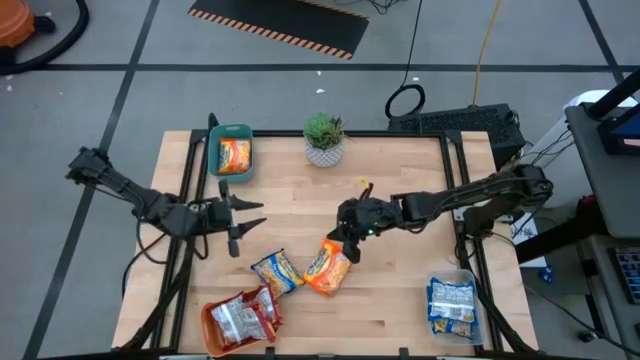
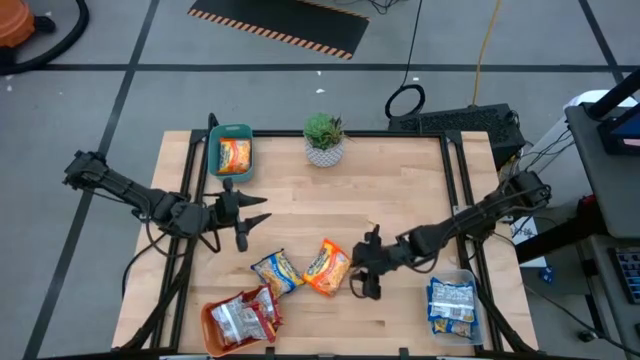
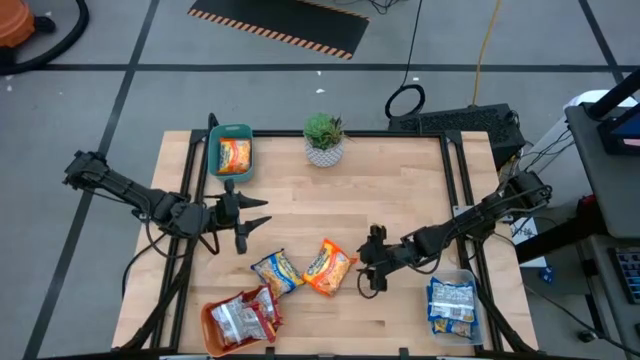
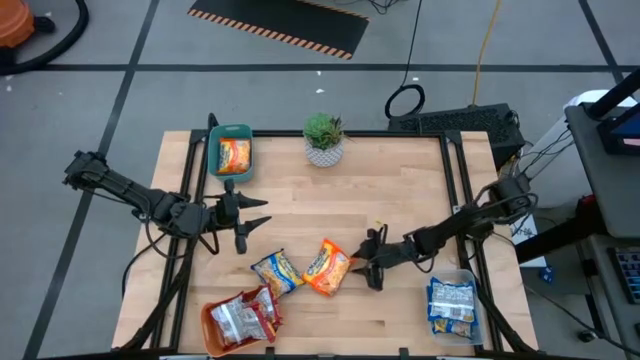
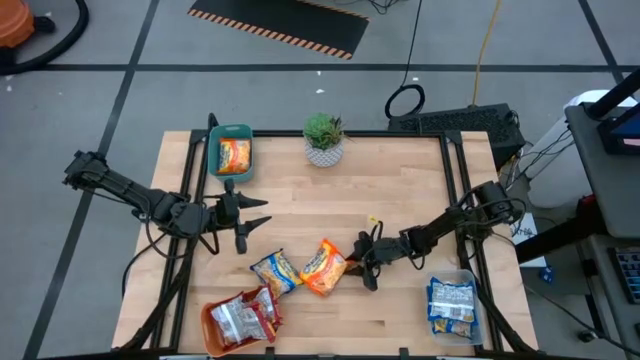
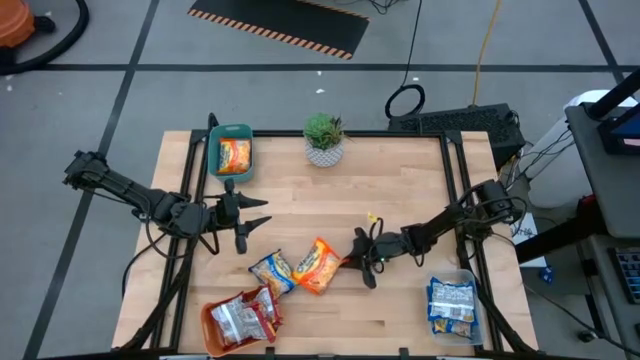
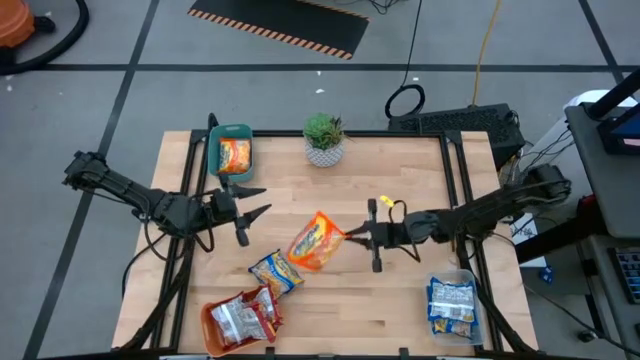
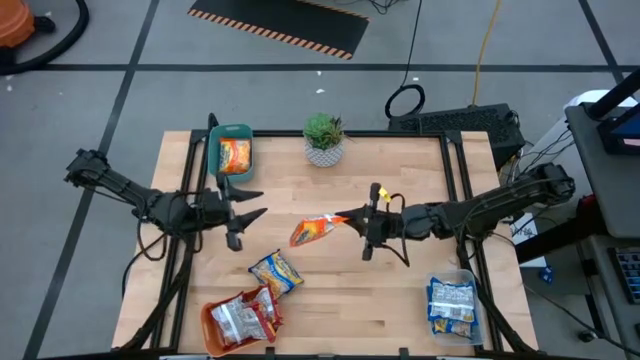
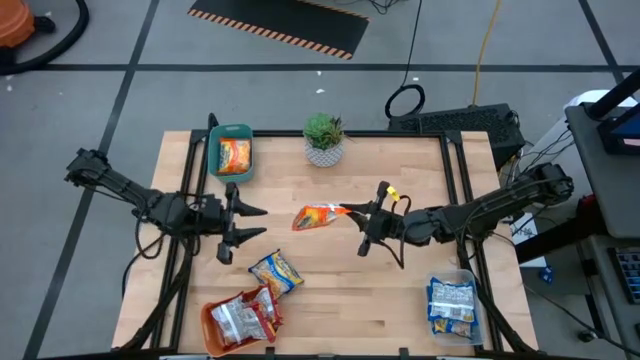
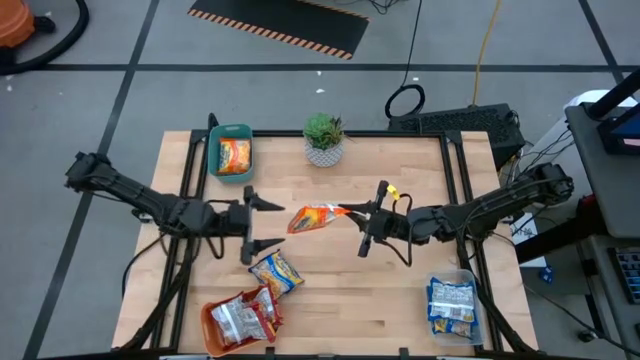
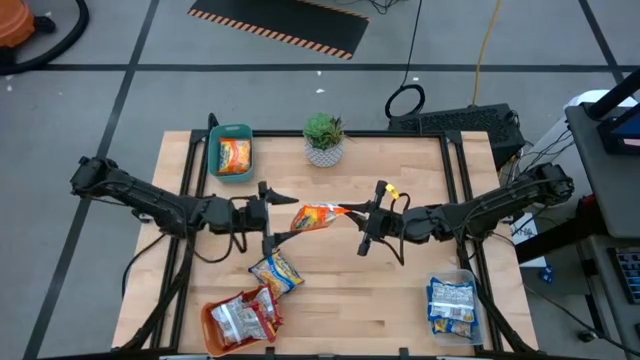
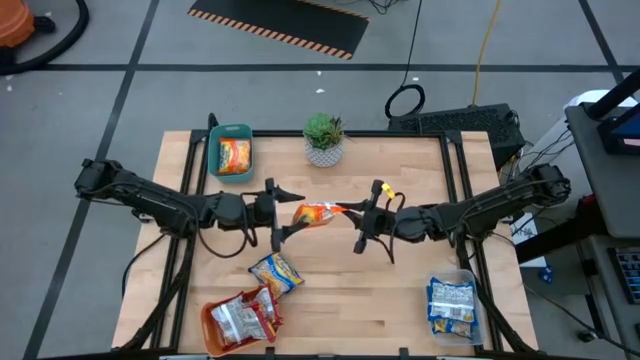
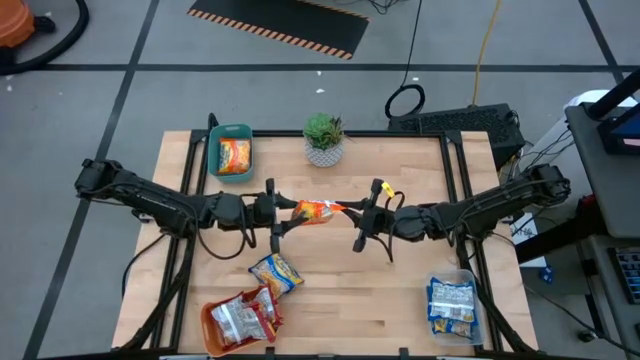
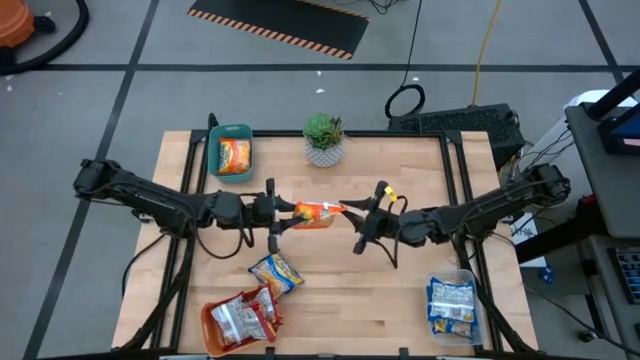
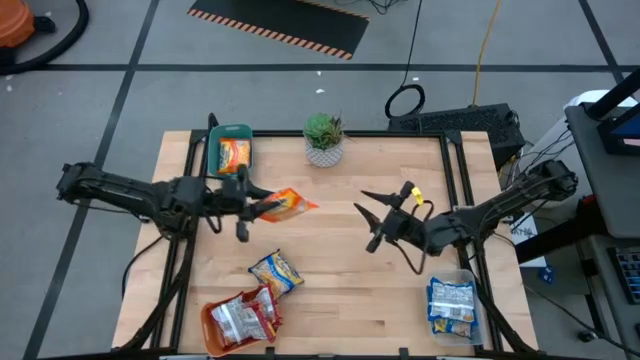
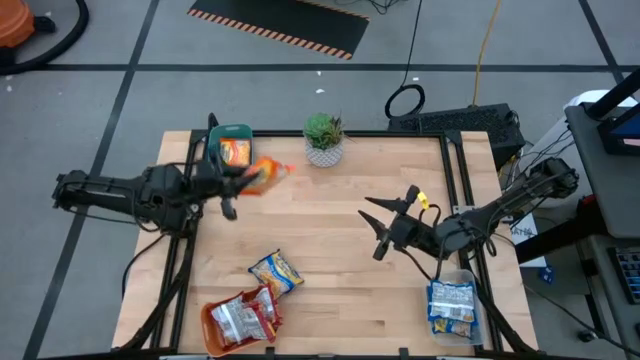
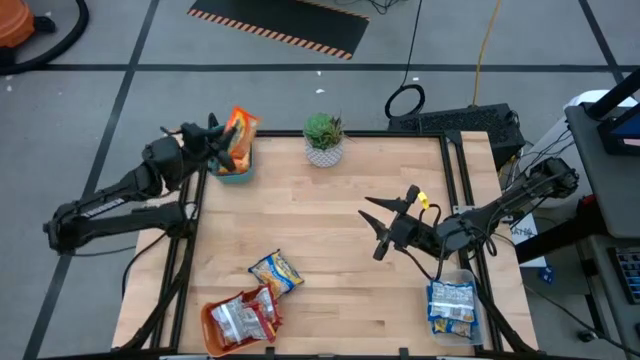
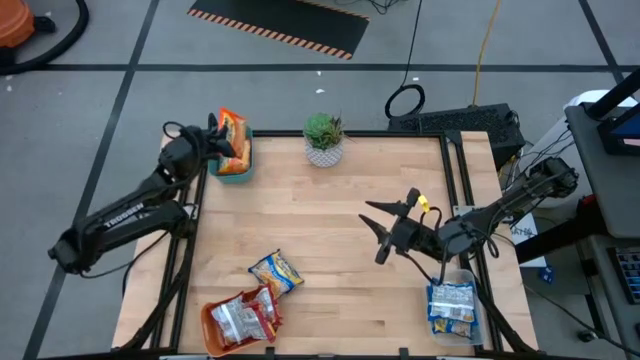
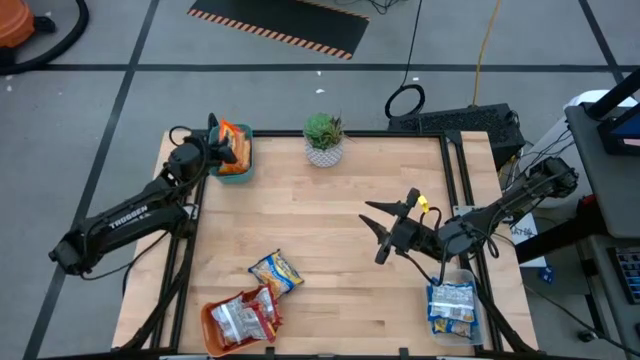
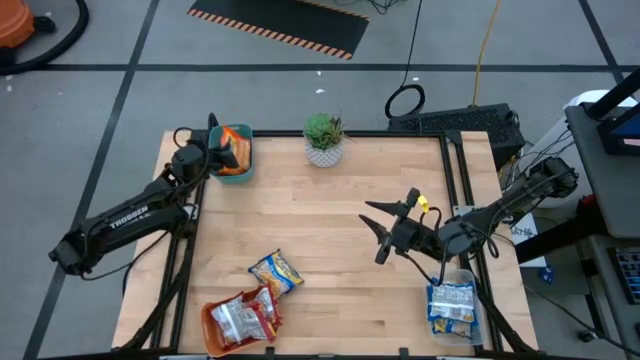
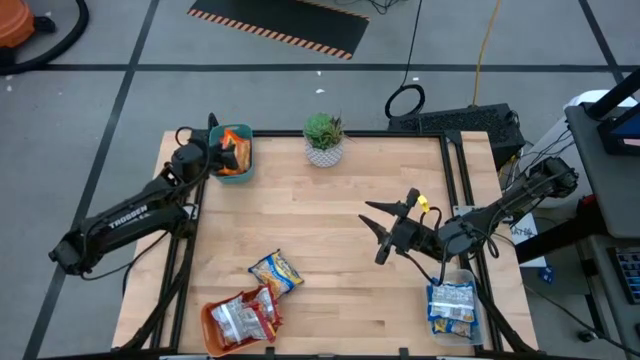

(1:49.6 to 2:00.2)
Task: Sort Maruchan noodles
Put the orange noodle pack into the blue bin

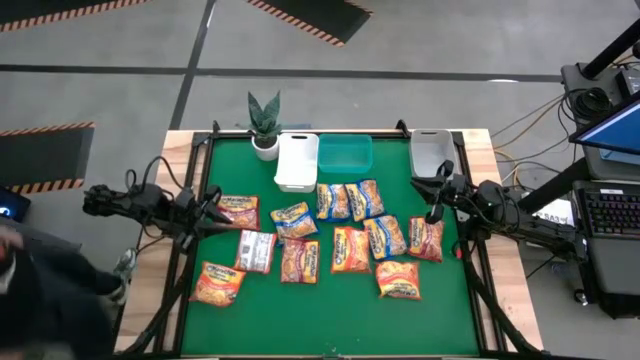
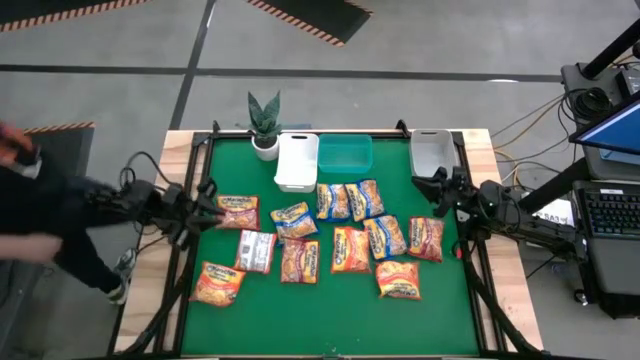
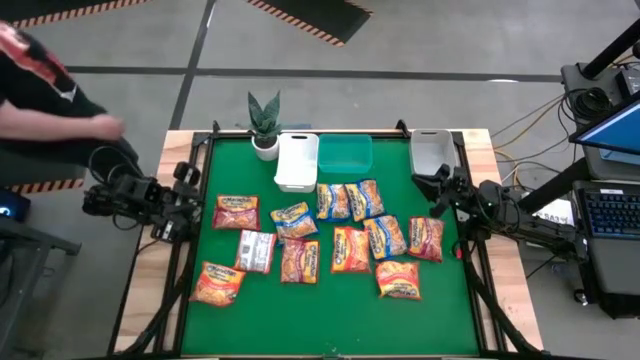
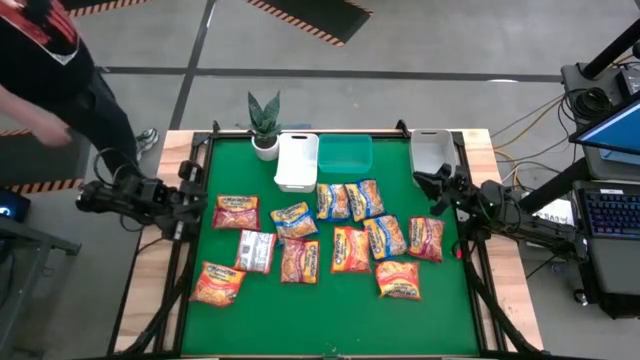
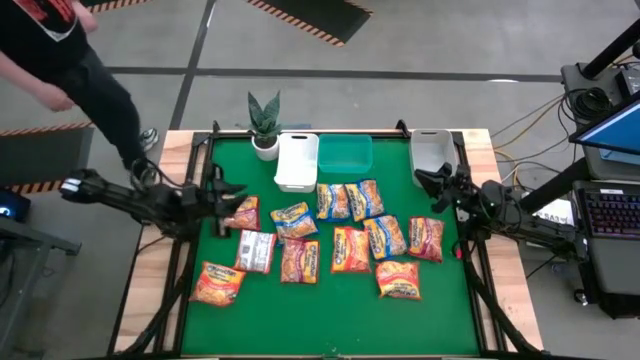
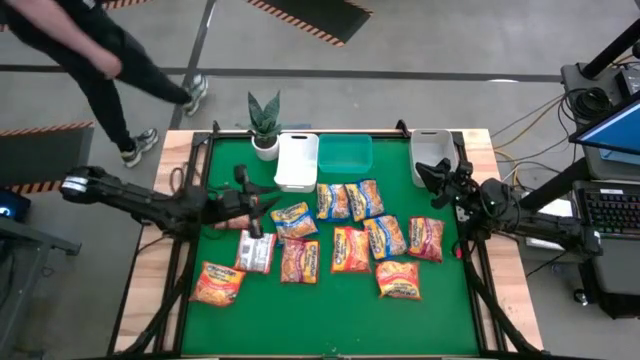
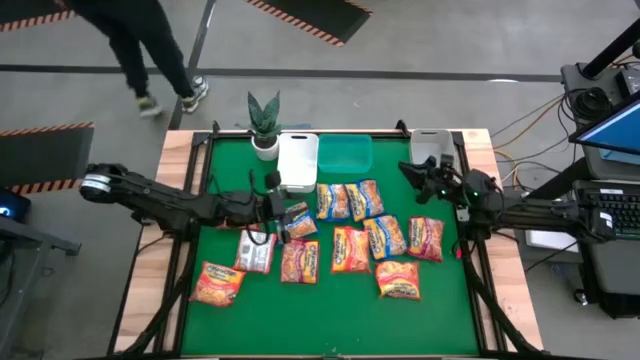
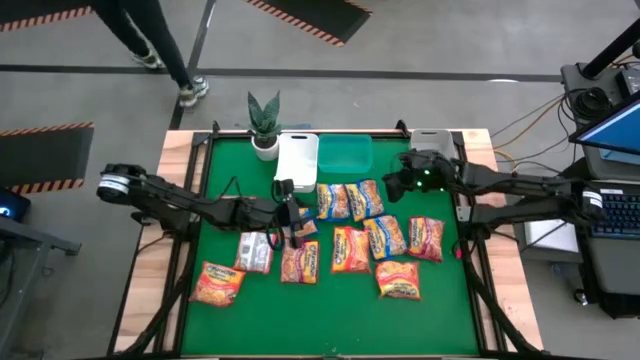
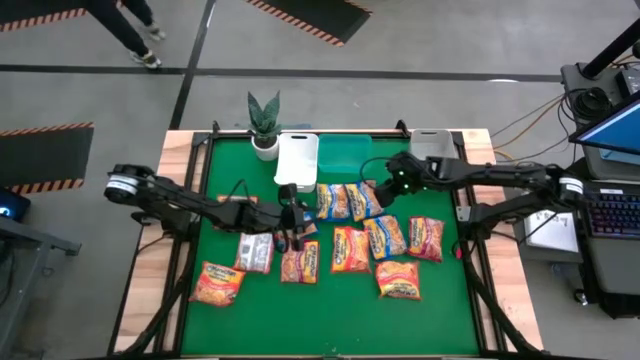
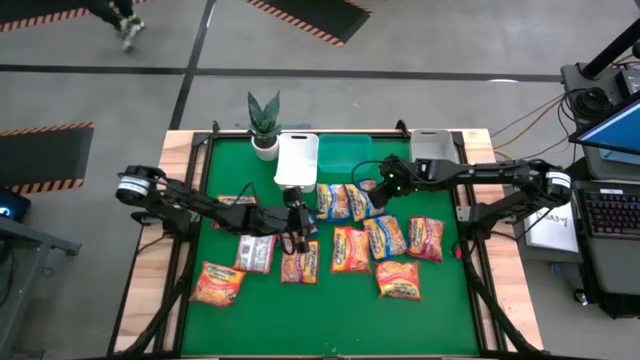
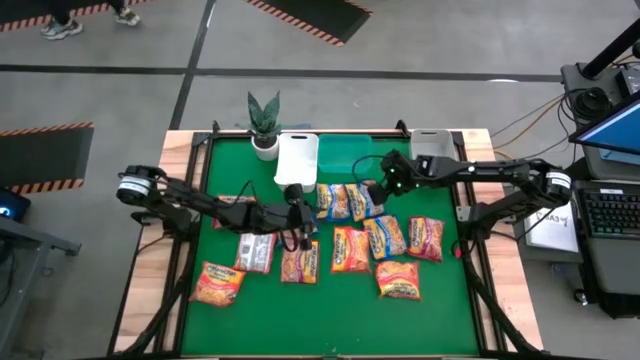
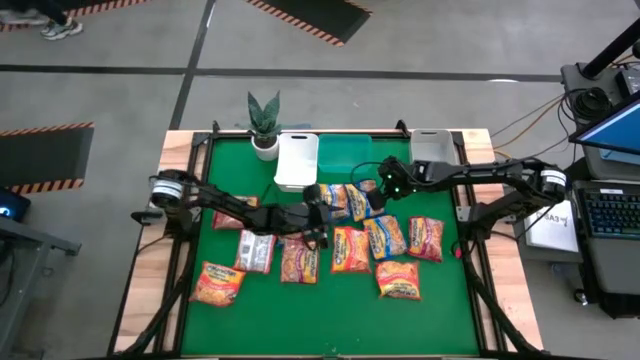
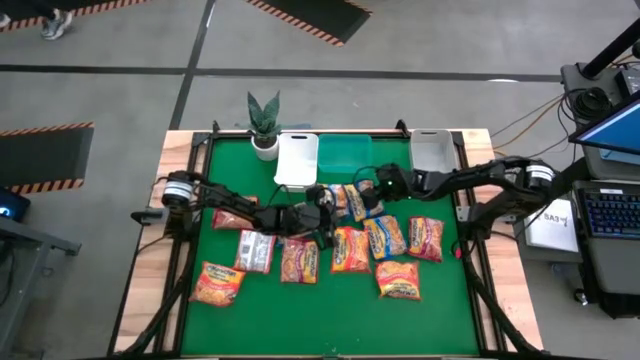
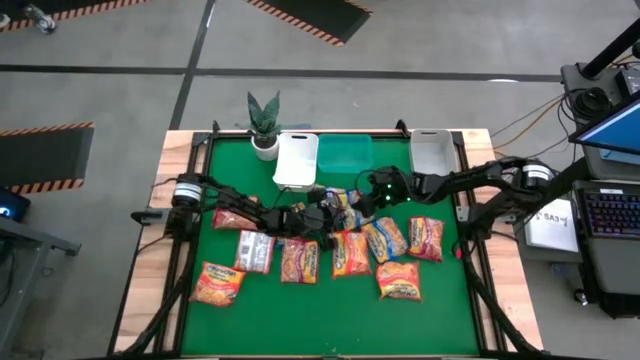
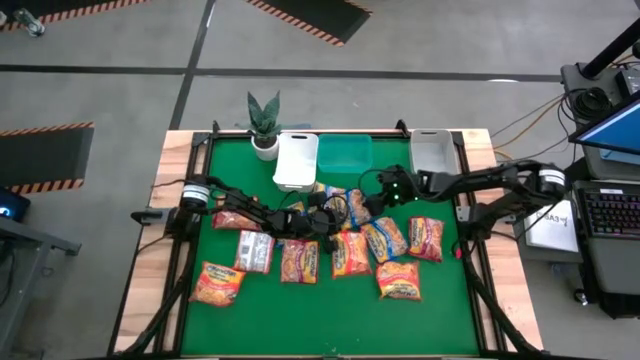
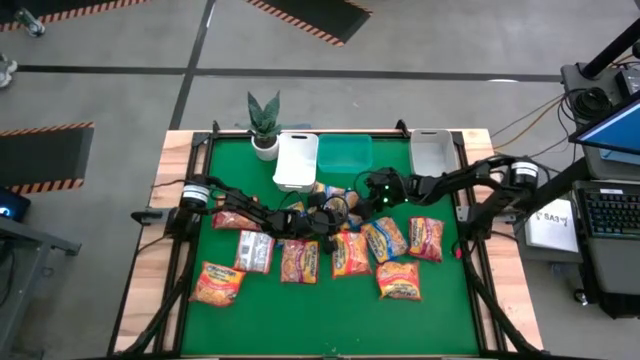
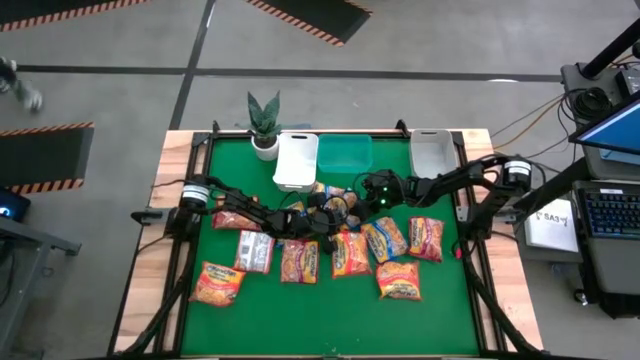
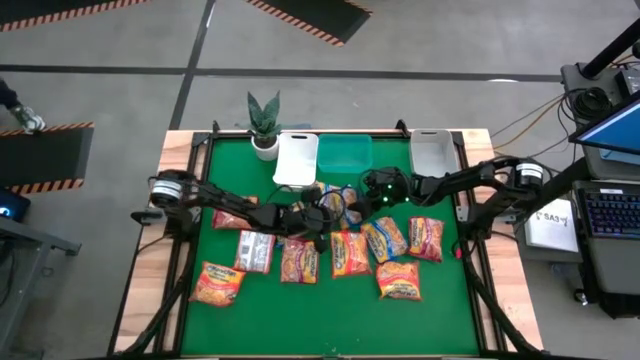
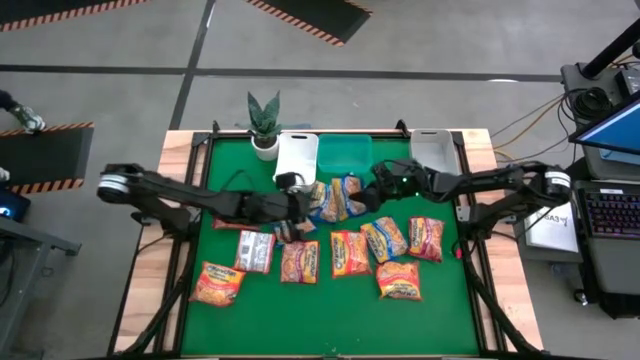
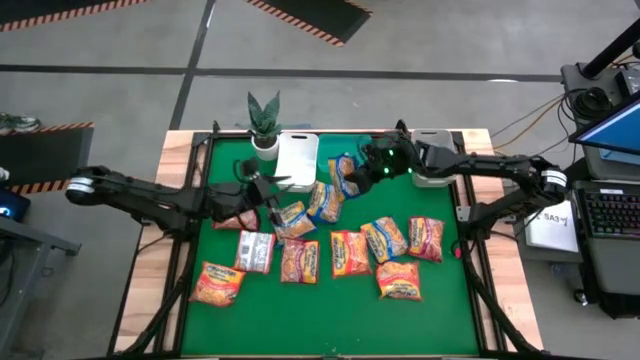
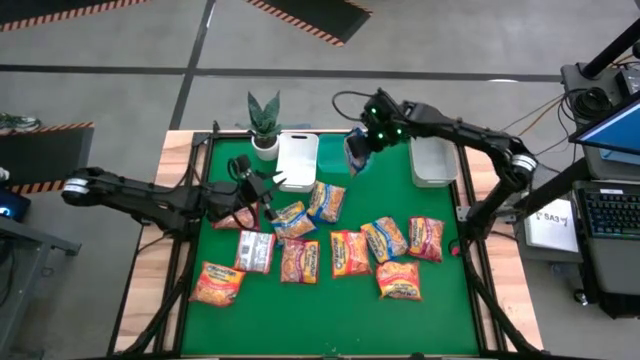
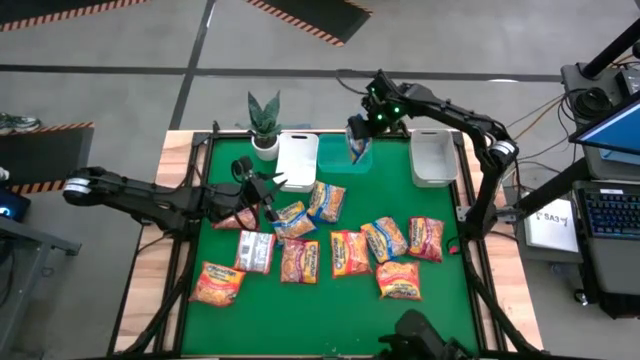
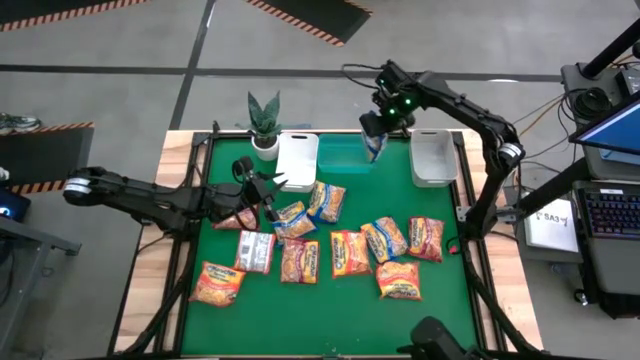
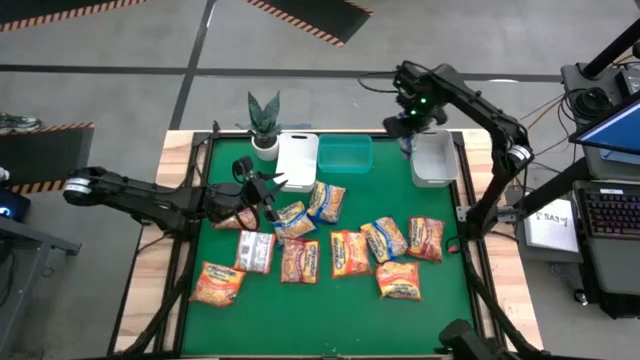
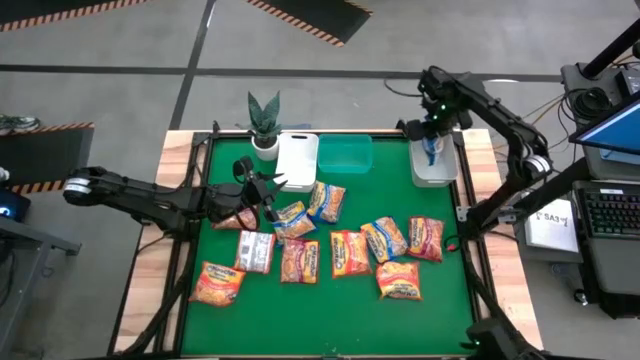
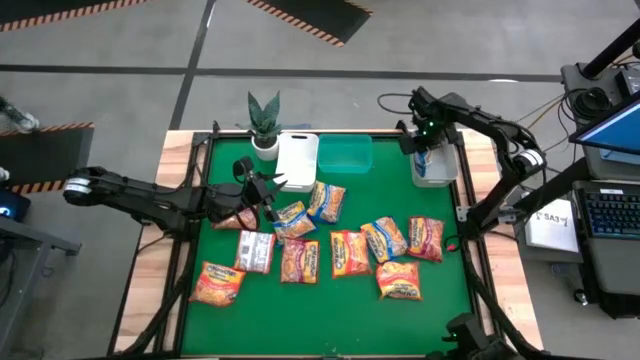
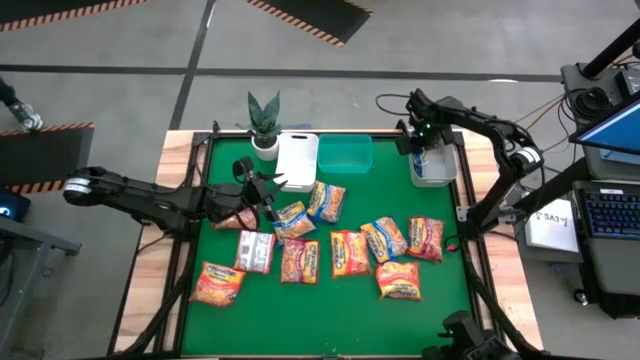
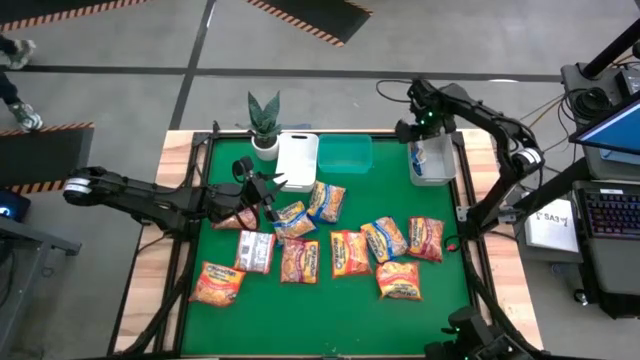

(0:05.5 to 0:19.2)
Task: Sort Maruchan noodles
Put the blue noodle pack into the gray bin
